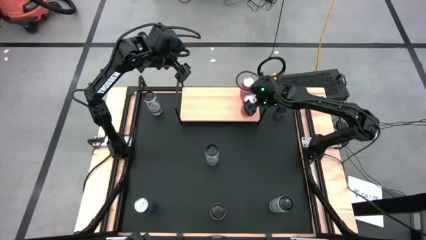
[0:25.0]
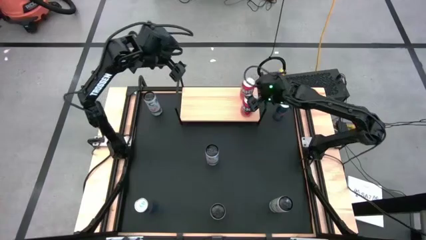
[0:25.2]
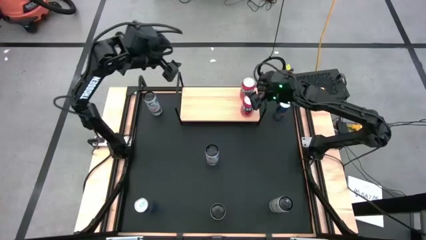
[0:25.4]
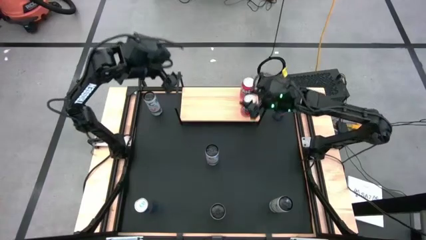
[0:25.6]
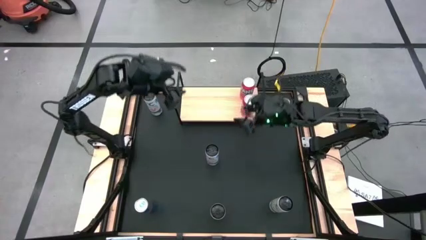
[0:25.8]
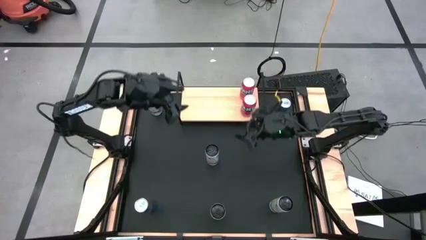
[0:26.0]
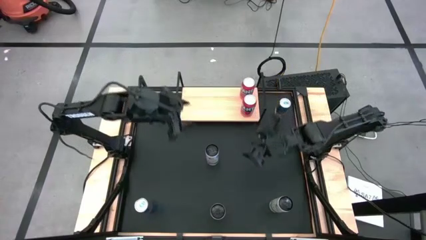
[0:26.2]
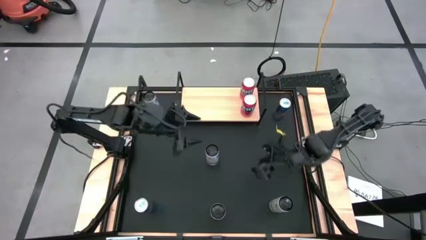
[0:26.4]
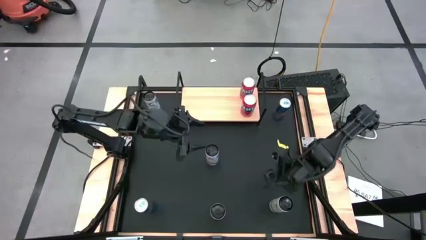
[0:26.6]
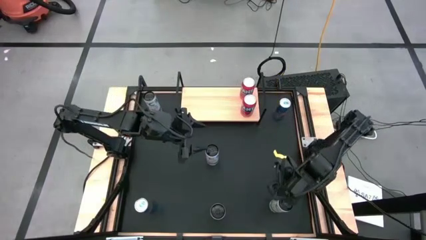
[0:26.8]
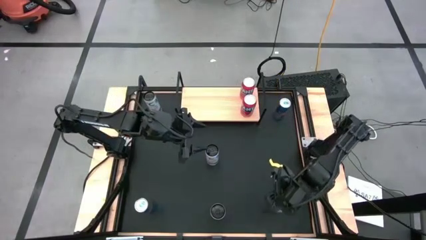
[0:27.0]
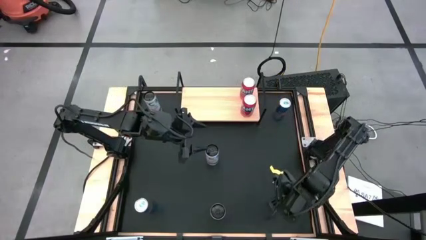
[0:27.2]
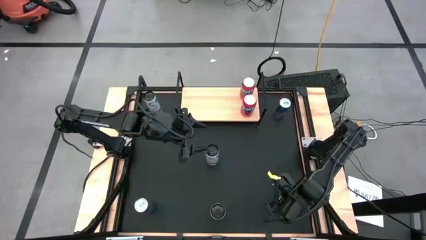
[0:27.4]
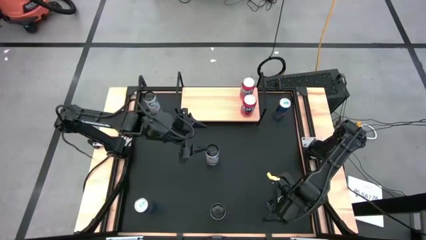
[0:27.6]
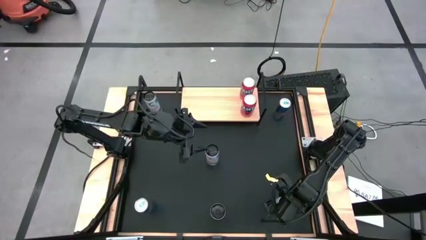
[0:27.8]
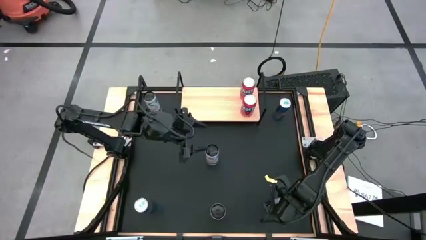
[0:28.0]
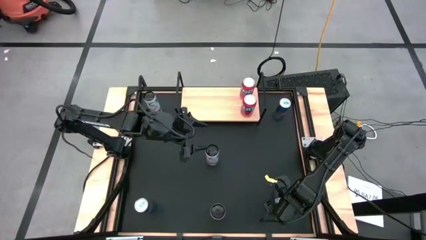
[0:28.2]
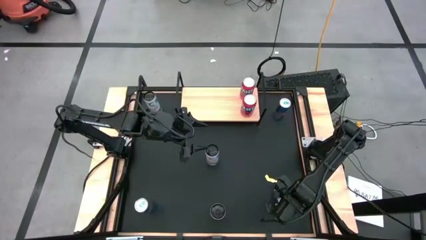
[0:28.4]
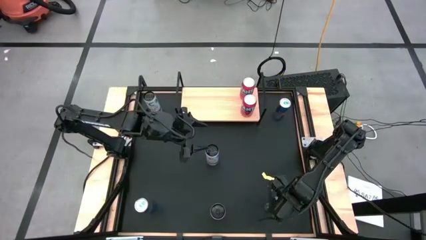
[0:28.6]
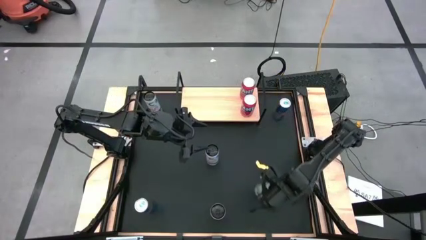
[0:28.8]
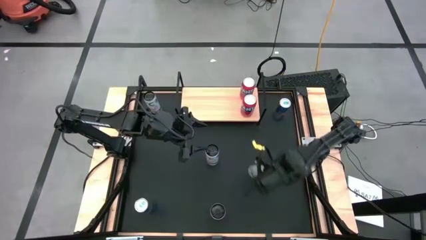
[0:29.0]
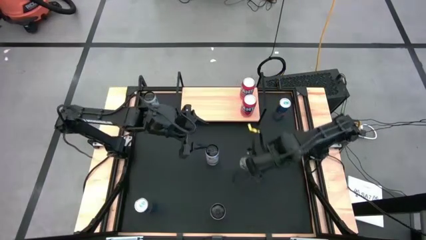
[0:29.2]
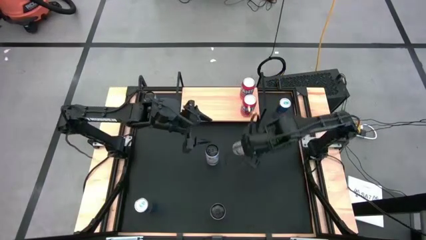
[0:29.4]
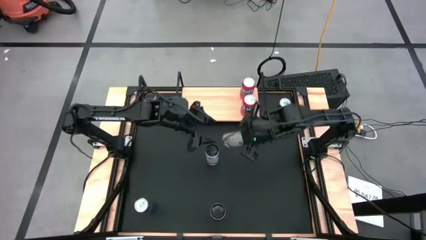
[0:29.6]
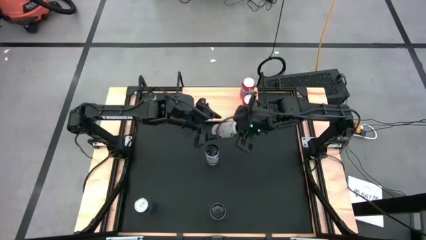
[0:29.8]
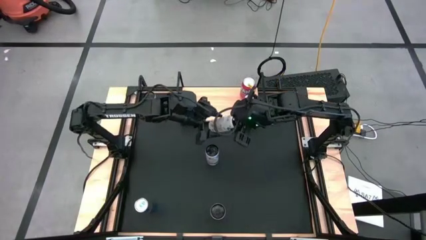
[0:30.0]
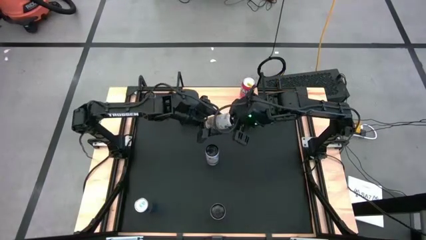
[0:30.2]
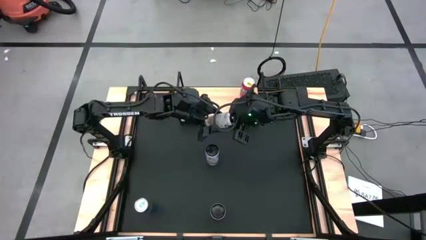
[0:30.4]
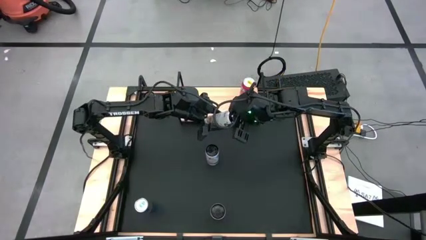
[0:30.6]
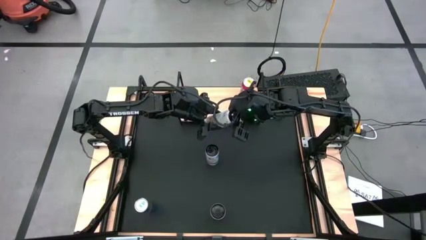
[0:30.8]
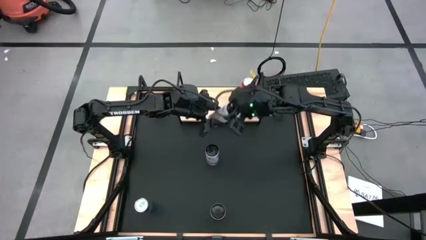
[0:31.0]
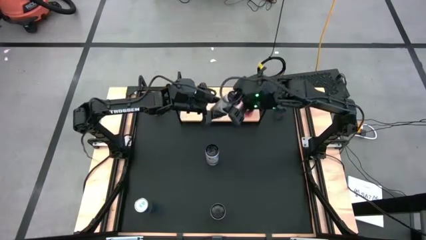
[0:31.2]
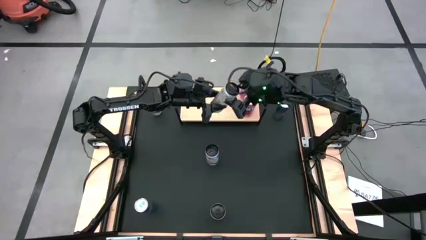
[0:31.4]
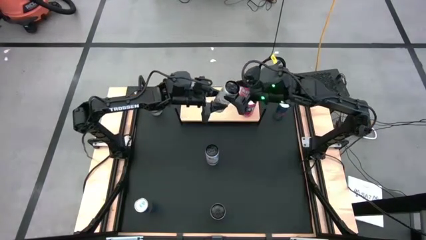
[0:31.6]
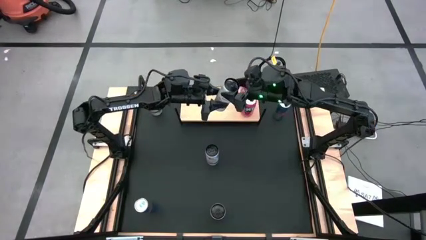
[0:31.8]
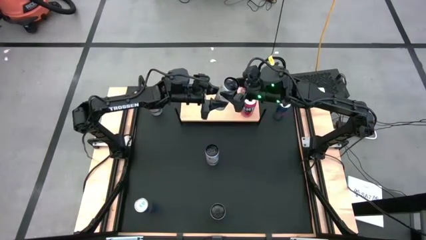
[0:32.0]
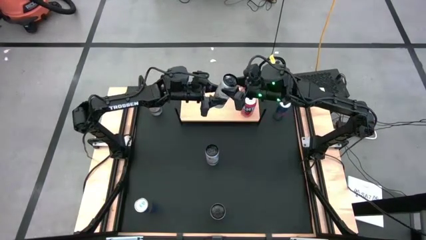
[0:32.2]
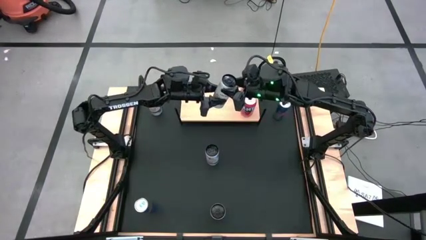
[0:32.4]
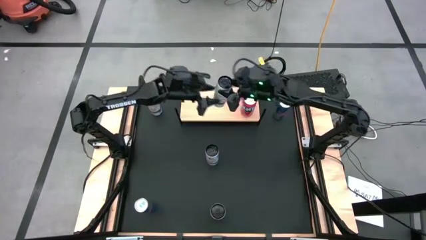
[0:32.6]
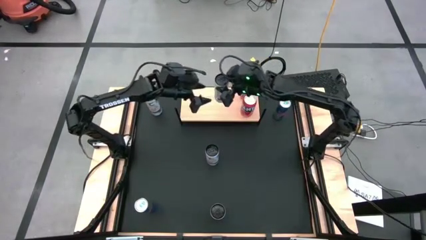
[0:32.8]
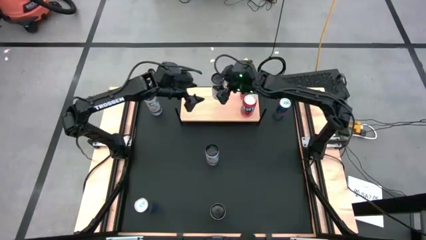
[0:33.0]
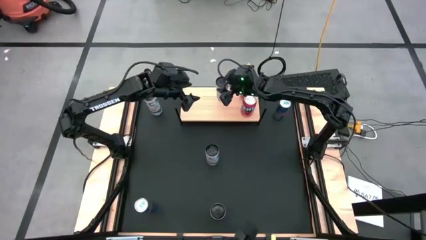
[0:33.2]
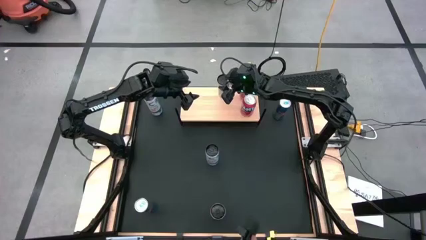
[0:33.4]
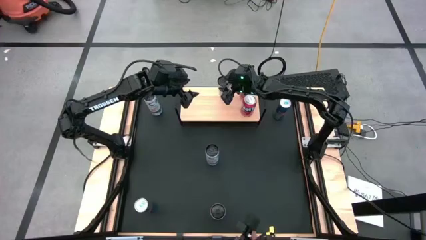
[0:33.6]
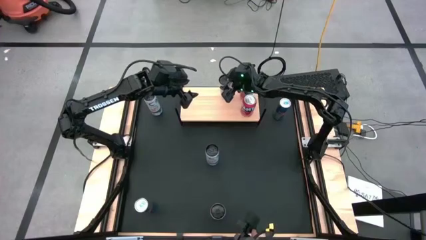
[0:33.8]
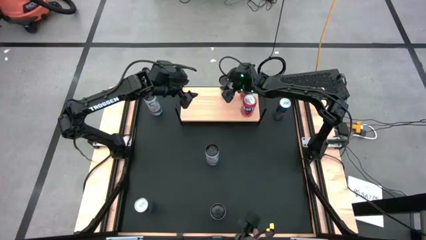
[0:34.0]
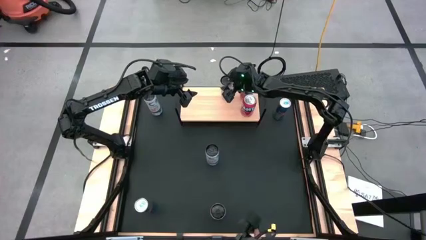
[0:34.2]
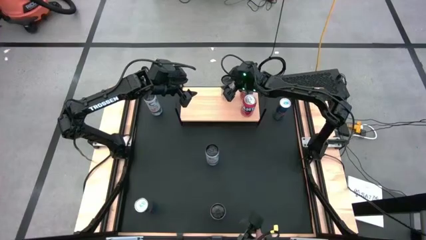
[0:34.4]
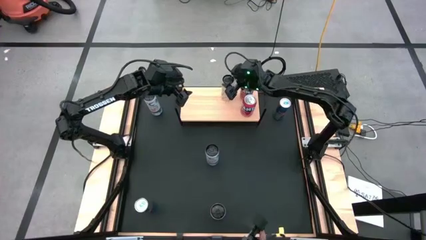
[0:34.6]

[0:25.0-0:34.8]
Task: Place canned beverage on shelf
Put the right white yellow soda can on the shelf

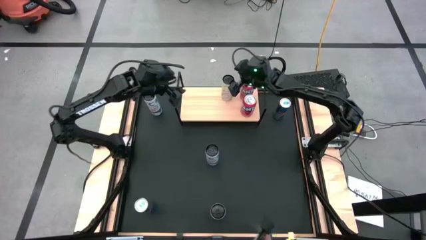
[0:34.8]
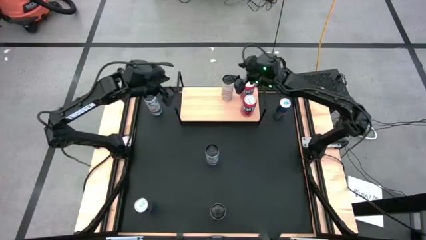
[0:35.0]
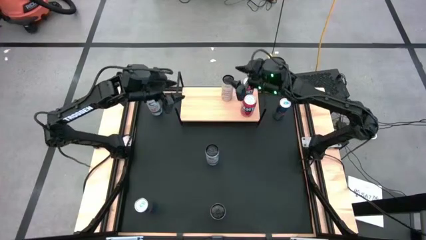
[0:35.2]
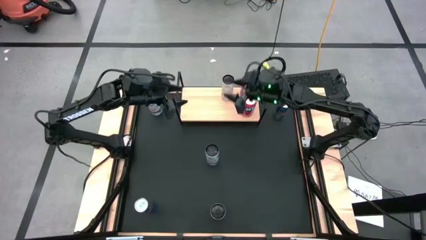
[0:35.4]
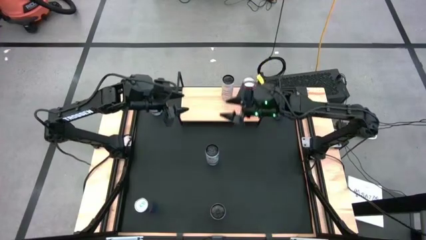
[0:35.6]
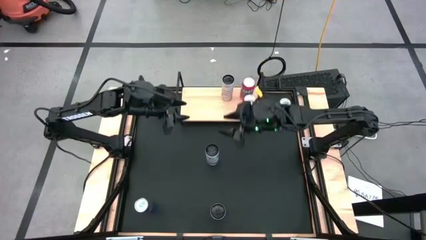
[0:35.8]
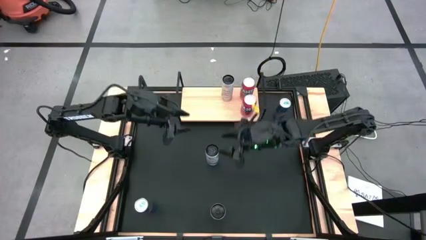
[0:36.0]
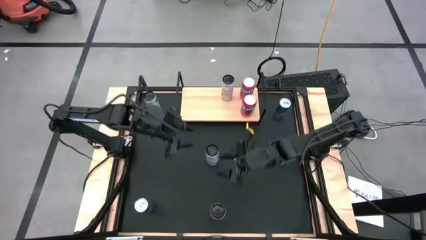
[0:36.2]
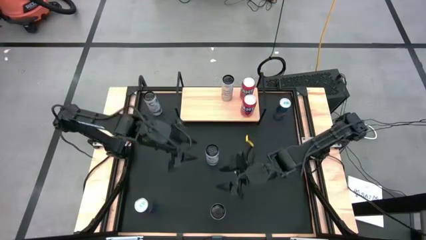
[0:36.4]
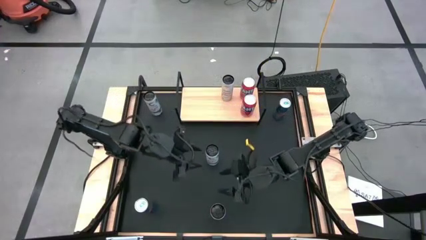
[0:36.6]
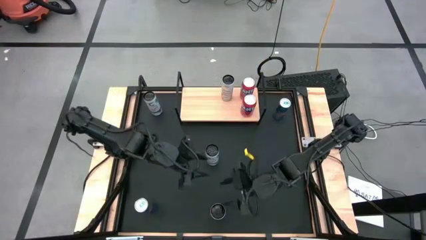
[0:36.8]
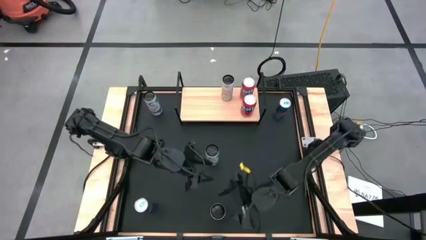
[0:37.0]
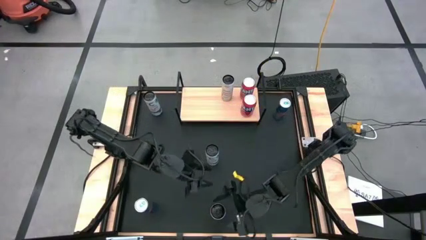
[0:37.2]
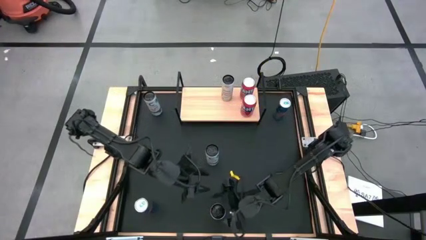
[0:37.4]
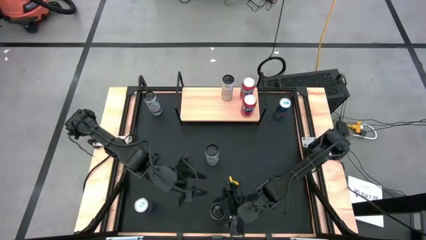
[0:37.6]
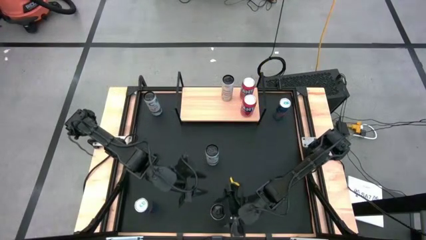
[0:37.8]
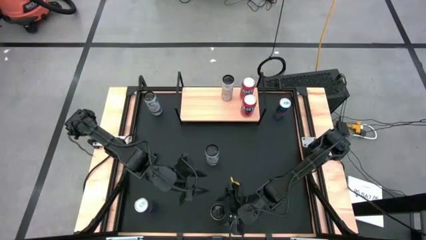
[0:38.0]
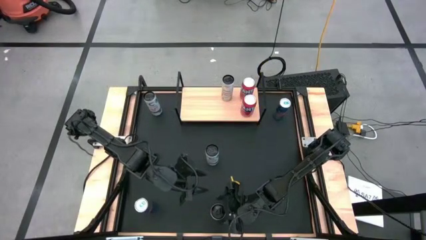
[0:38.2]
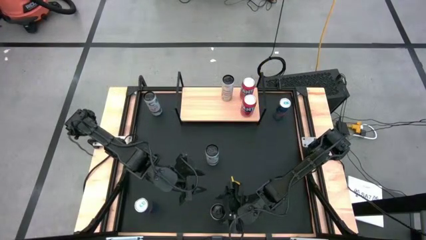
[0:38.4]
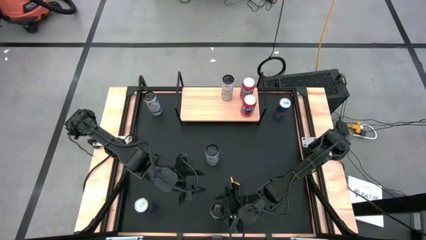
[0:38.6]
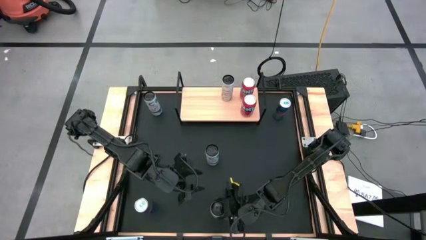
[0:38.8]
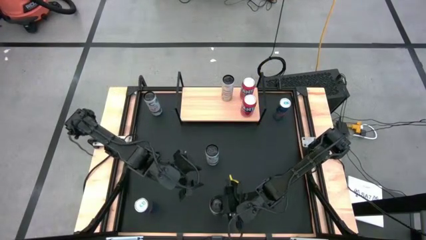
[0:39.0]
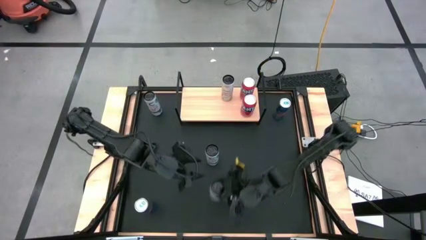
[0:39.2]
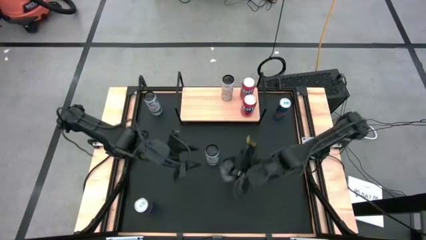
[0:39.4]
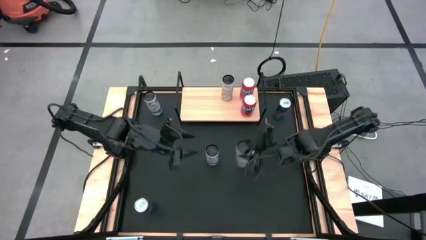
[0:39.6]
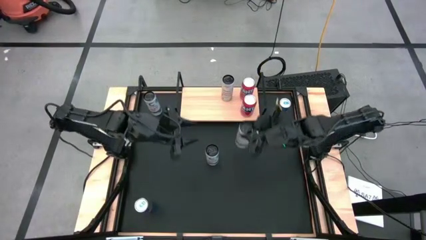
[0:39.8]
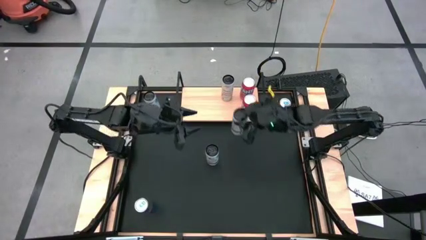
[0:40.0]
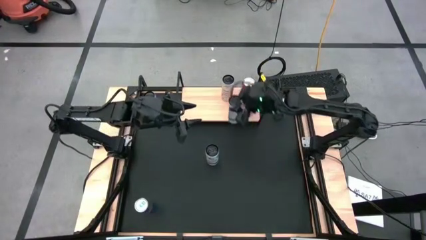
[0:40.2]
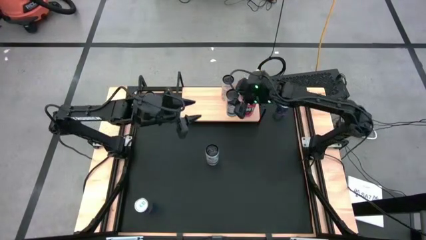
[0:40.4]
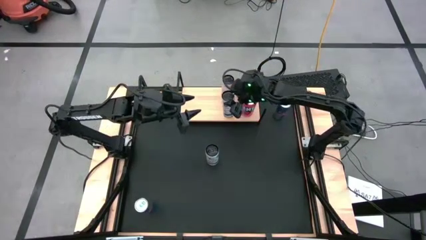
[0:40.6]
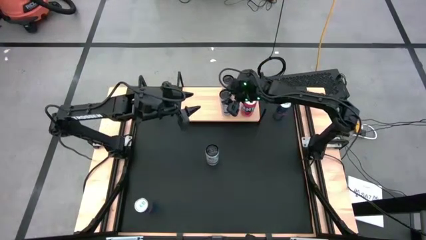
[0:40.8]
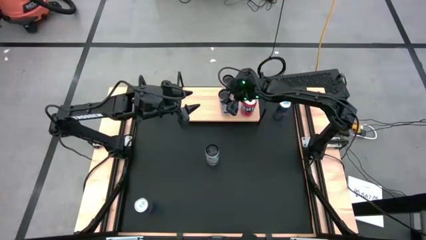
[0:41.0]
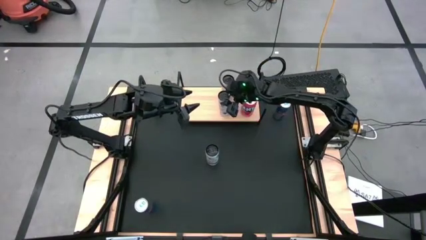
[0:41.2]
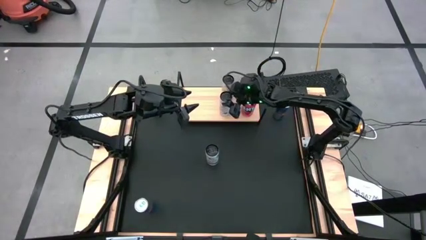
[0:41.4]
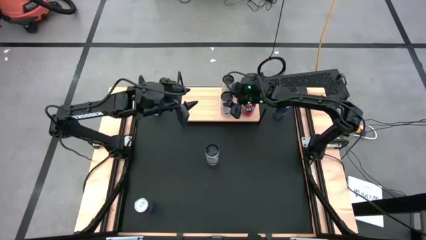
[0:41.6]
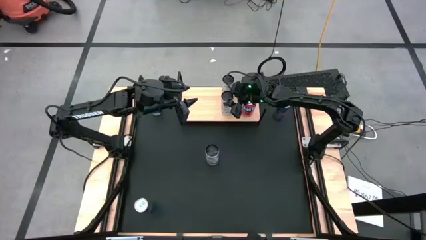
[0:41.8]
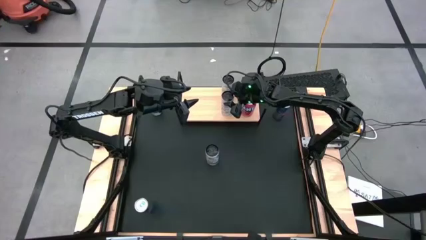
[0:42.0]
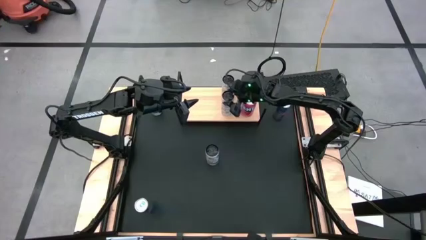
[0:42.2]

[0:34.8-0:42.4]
Put the white yellow soda can on the shelf aligned with the other white yellow soda can
